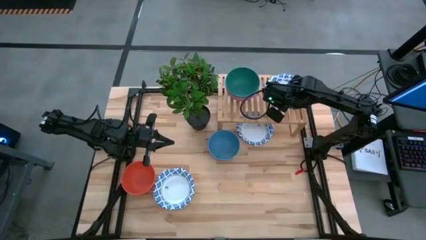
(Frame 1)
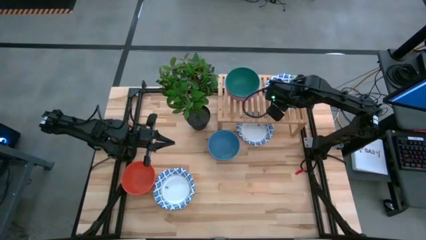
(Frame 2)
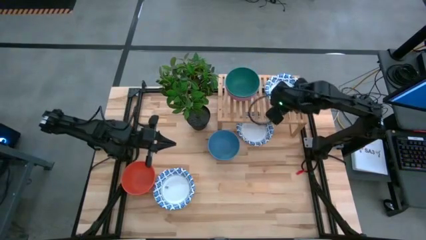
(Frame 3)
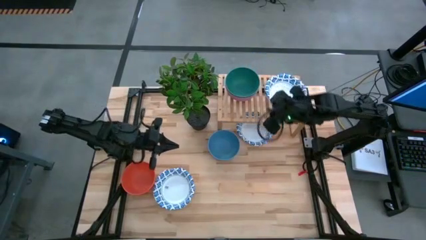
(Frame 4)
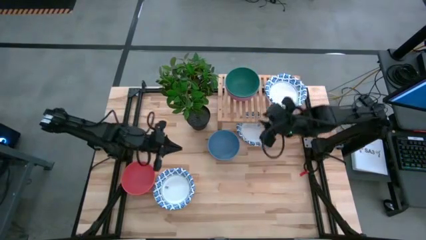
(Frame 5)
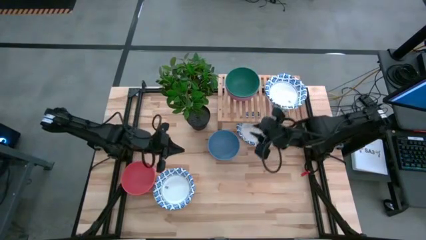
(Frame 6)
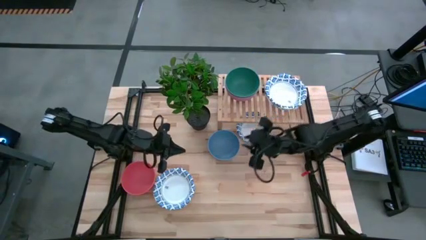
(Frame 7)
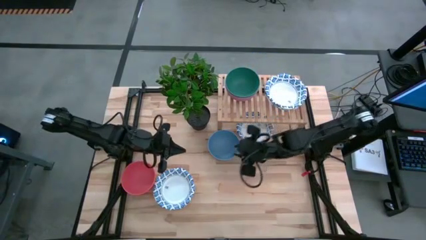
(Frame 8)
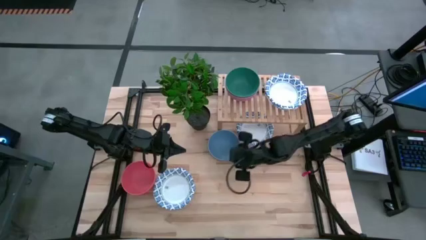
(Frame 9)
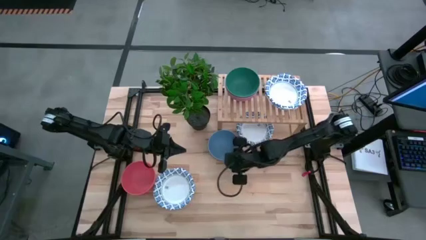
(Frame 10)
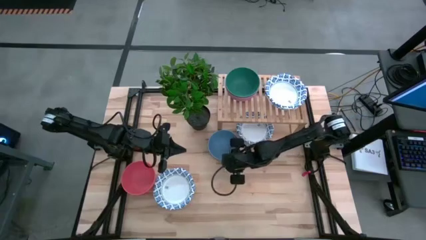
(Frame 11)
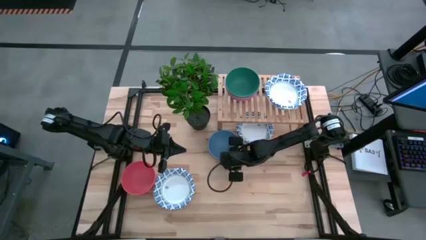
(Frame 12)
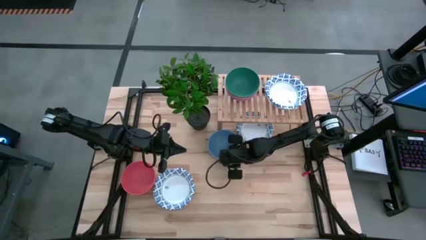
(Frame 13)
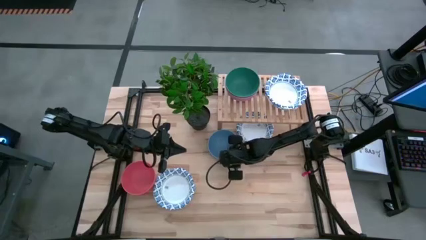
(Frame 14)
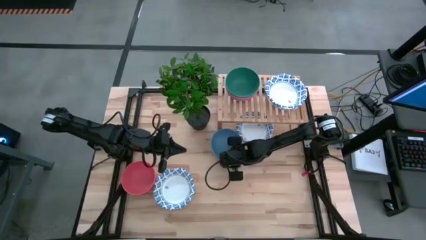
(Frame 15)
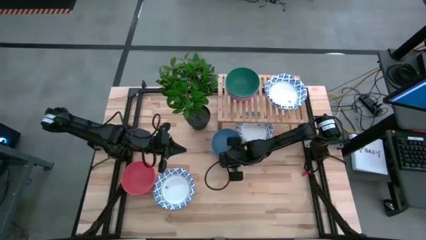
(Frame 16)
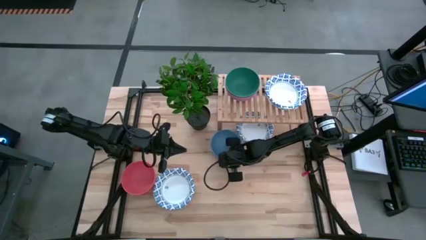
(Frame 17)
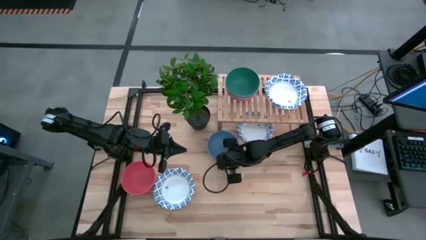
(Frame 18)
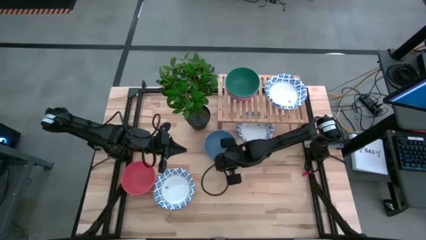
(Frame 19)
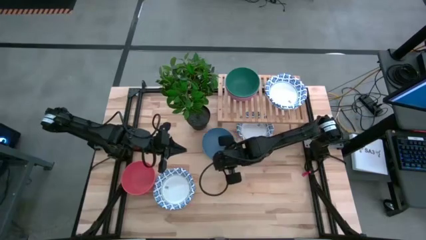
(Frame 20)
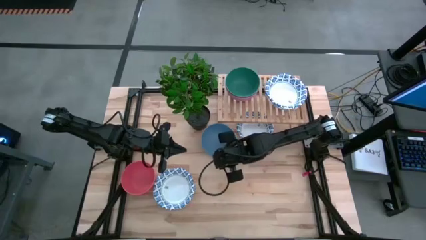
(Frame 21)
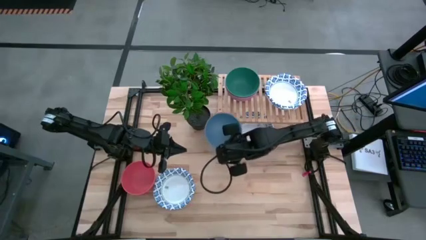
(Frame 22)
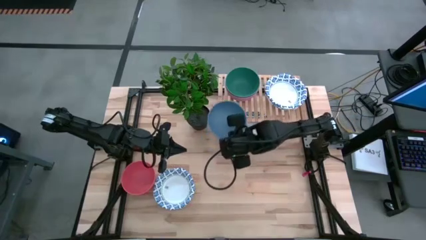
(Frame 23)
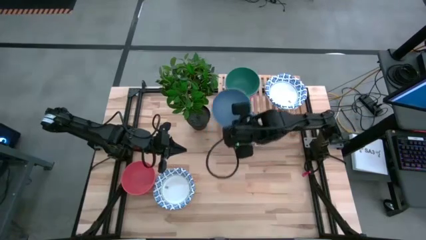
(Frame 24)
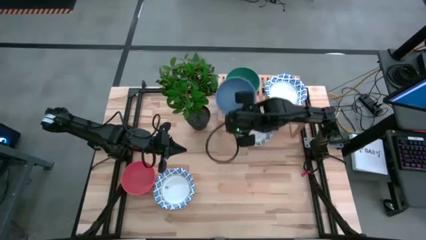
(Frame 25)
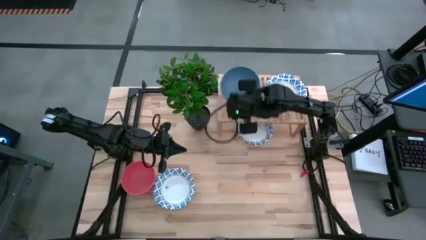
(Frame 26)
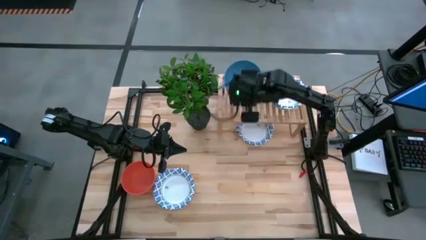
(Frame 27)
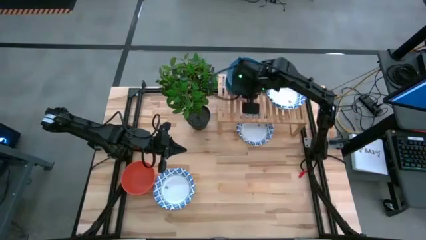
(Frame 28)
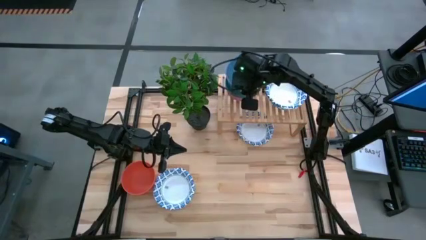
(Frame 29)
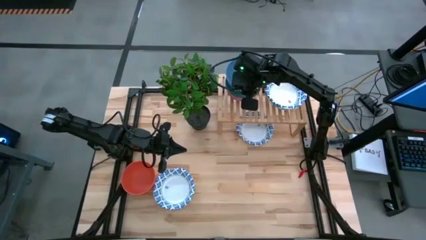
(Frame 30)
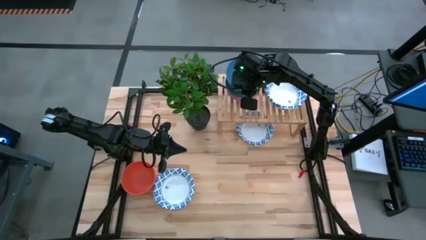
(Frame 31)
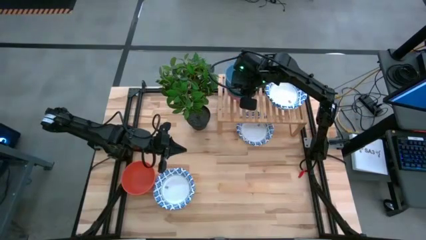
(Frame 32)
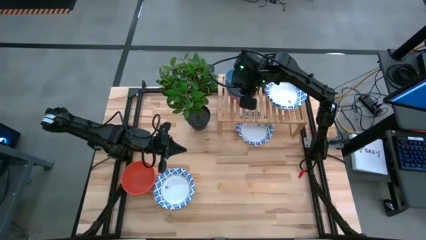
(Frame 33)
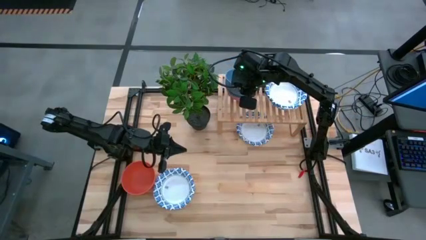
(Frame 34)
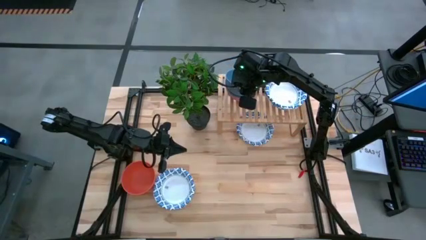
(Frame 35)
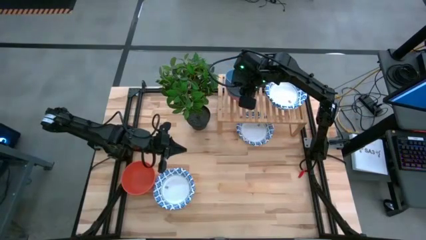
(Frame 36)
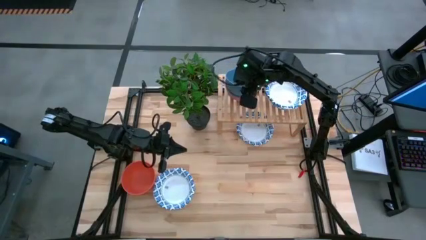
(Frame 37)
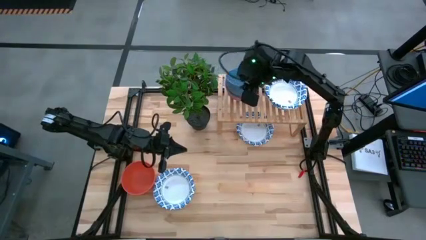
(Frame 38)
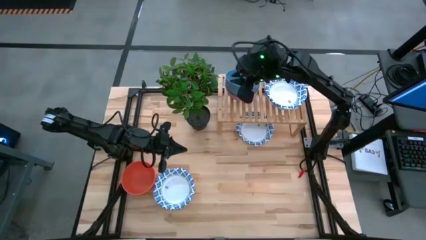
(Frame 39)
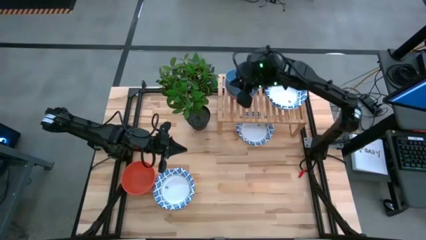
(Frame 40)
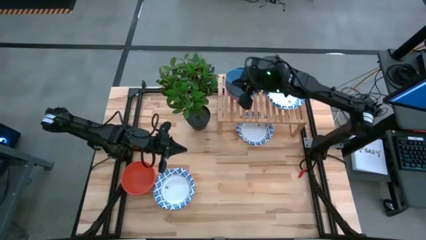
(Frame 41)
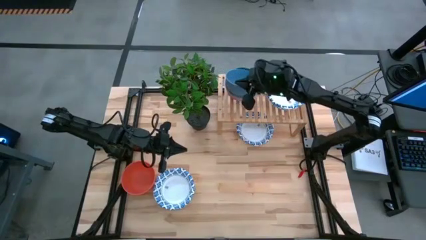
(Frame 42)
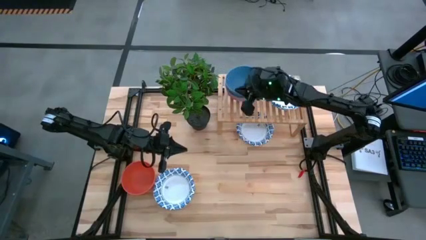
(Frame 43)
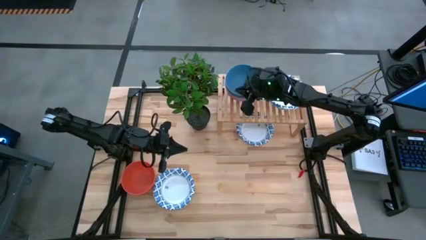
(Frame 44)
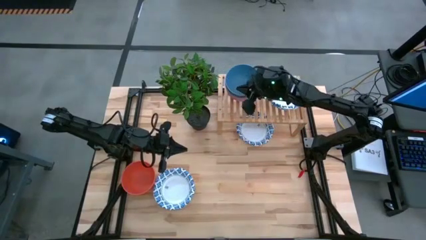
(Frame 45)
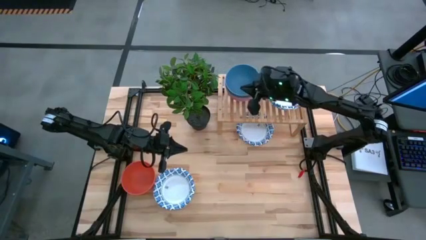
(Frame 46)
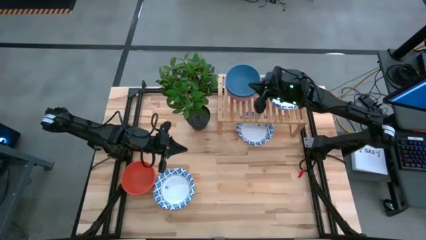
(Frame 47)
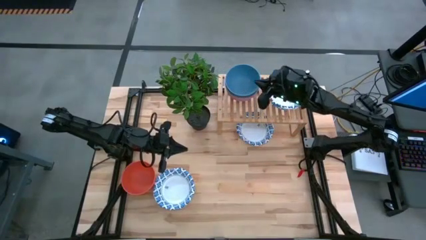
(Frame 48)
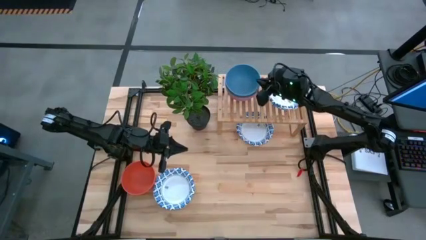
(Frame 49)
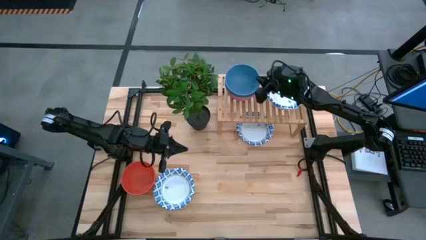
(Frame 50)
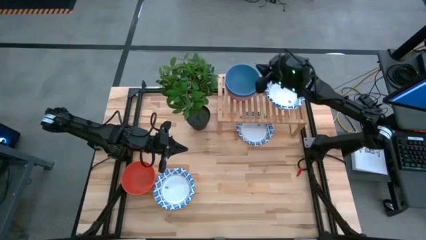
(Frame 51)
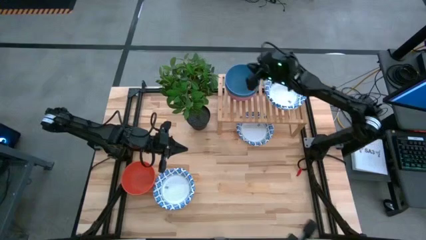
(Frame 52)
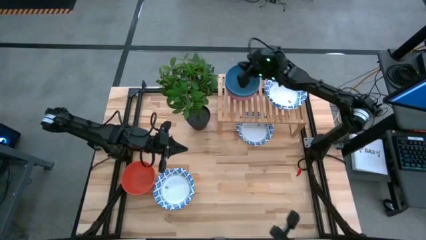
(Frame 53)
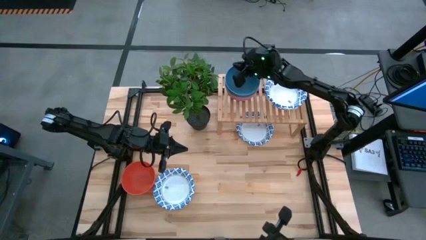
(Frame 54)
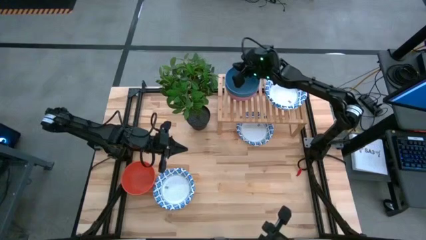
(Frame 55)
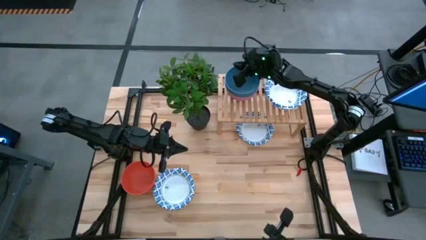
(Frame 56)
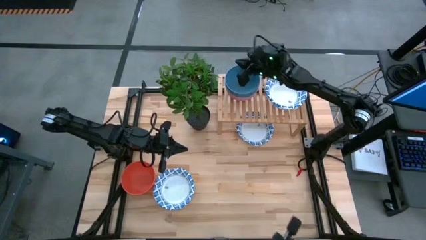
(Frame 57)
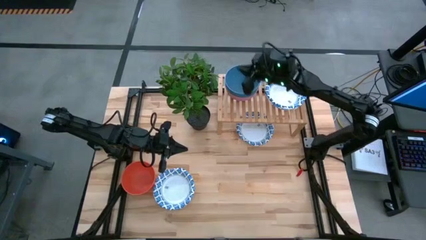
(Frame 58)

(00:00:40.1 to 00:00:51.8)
Task: Place and stack bowls onto a shelf
Stack the blue bowl on top of the green bowl on the shelf

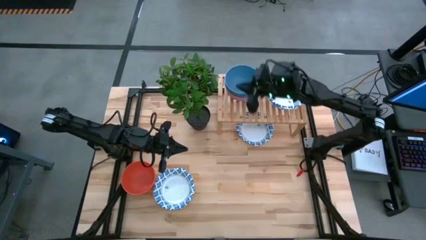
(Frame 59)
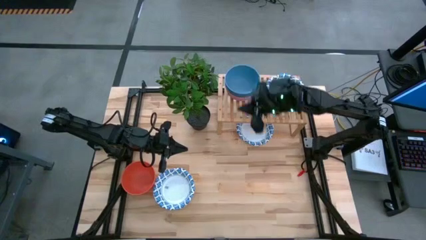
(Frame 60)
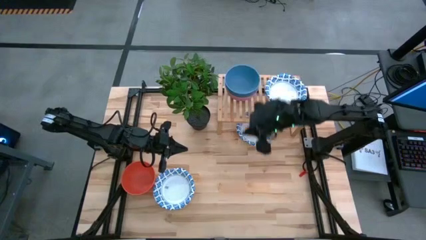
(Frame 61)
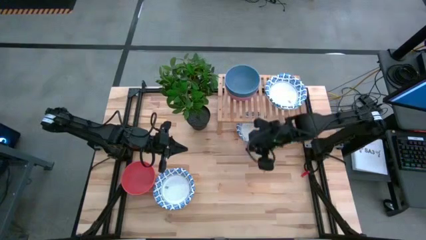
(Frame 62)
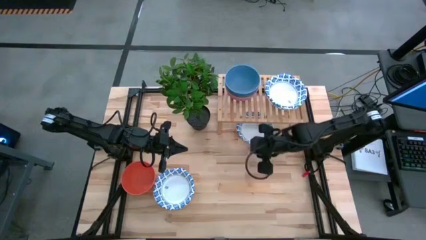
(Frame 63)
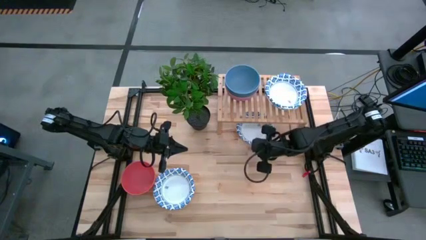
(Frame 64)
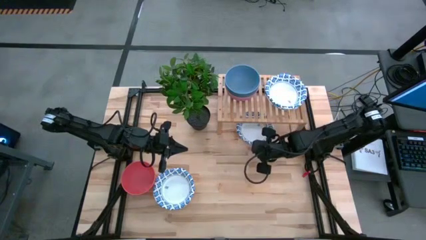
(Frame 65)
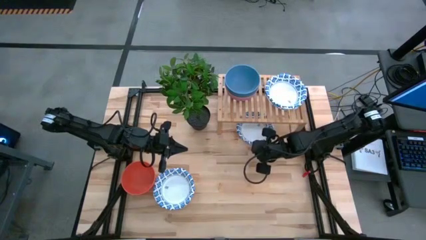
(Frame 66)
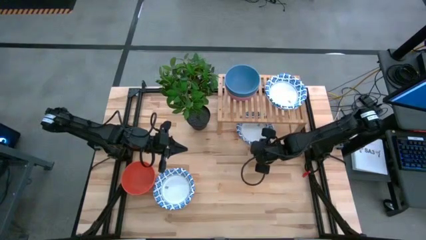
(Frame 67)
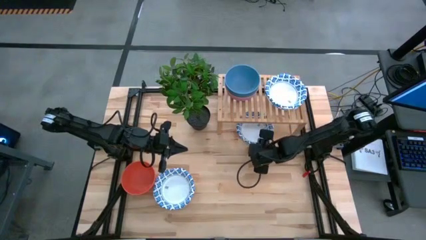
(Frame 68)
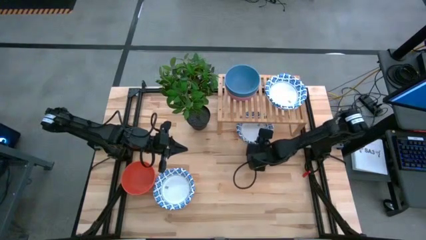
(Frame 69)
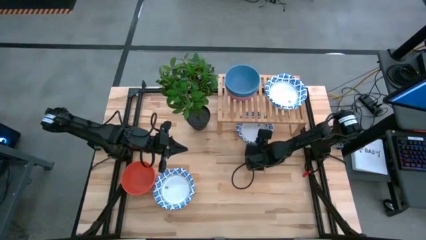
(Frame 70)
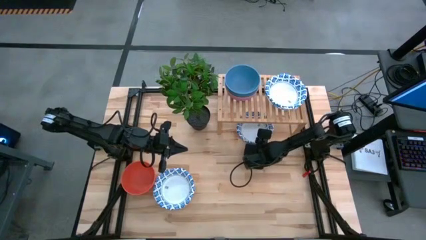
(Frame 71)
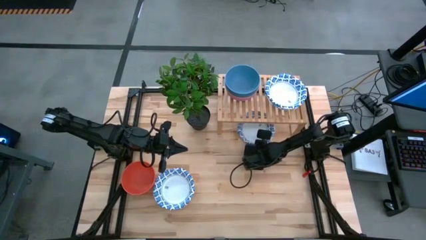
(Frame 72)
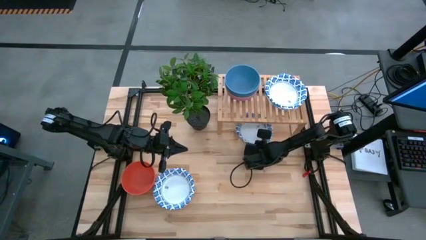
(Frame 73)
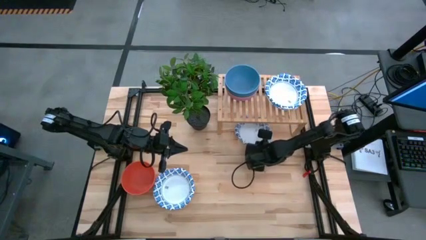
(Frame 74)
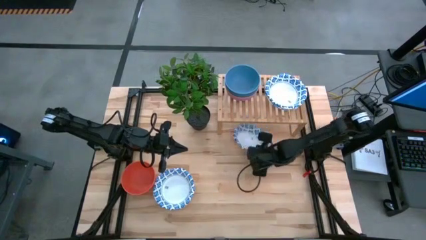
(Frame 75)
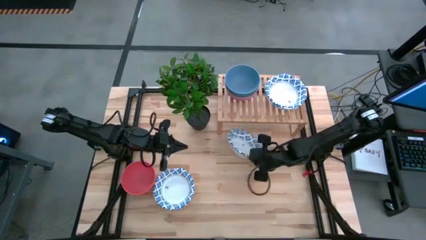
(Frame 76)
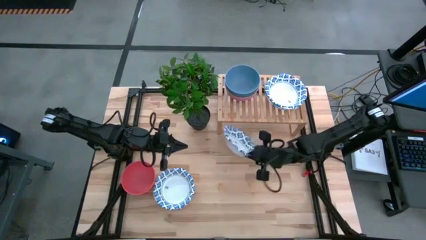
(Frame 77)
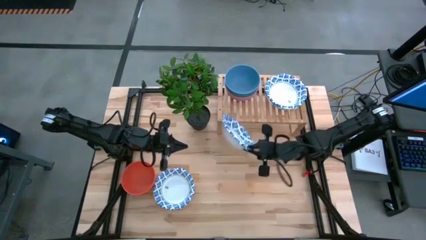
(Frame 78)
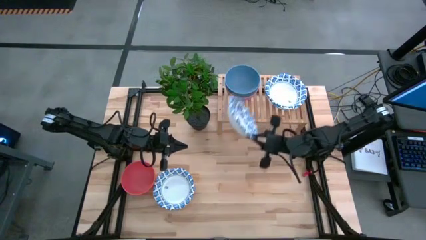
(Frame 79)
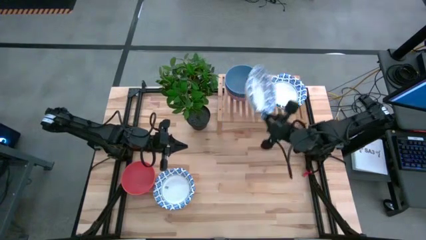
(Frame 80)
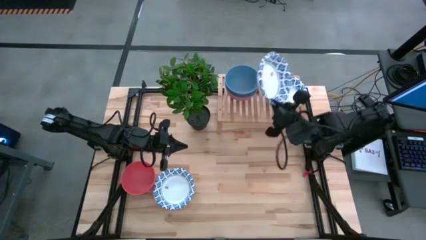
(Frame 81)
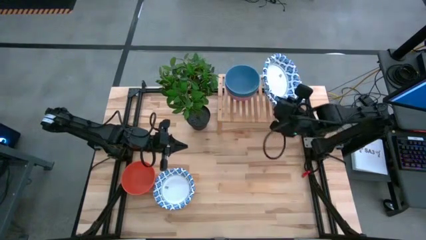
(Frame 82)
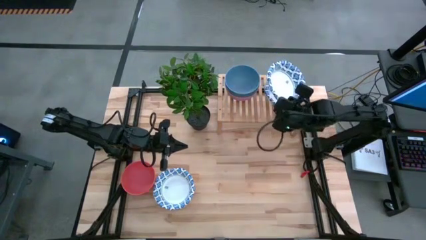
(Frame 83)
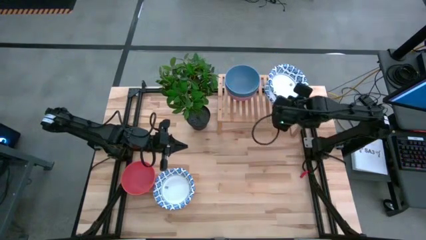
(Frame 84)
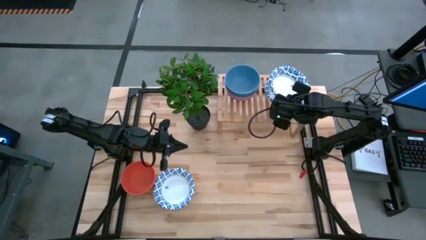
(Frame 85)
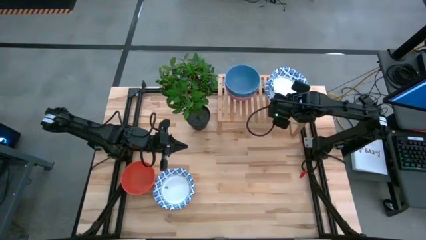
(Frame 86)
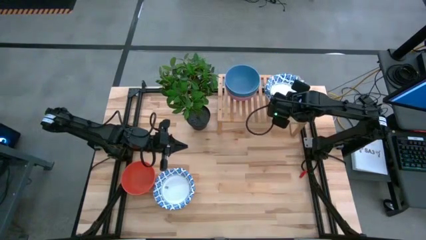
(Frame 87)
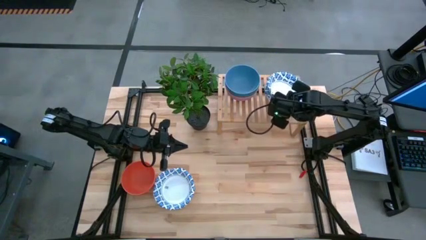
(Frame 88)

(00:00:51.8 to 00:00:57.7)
Stack the white patterned bowl on top of the other white patterned bowl on the shelf
